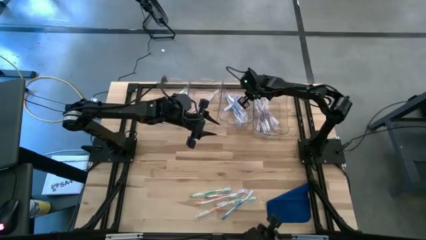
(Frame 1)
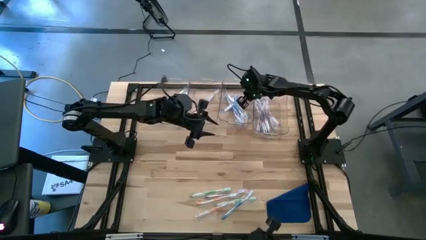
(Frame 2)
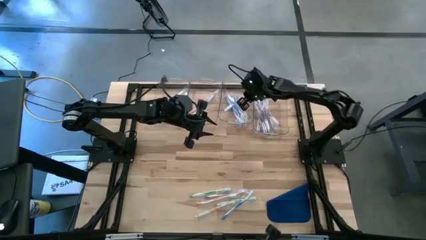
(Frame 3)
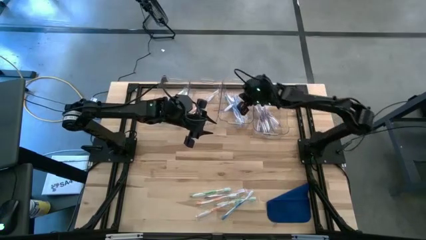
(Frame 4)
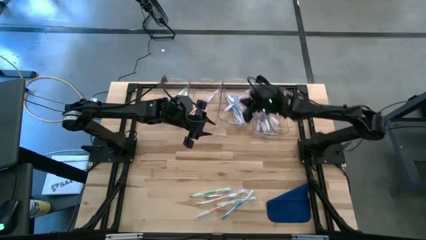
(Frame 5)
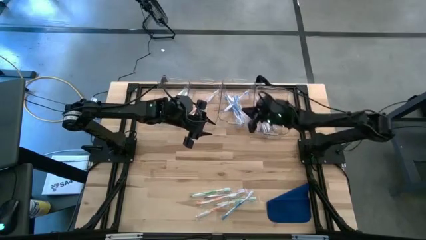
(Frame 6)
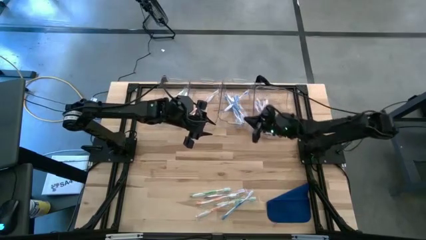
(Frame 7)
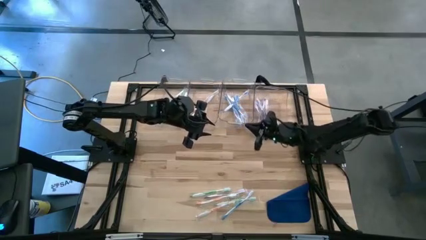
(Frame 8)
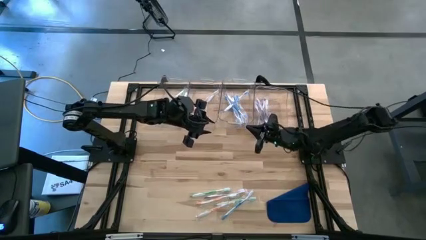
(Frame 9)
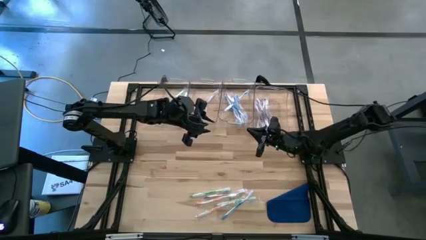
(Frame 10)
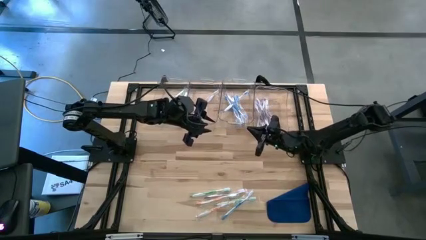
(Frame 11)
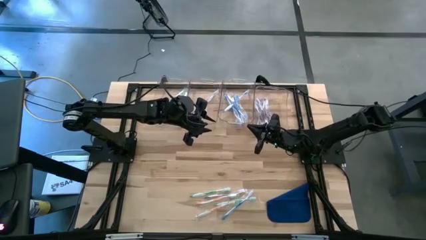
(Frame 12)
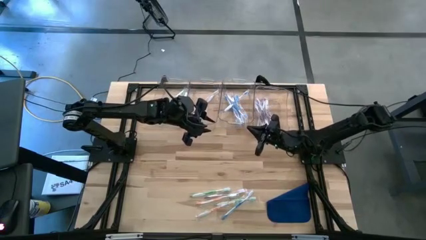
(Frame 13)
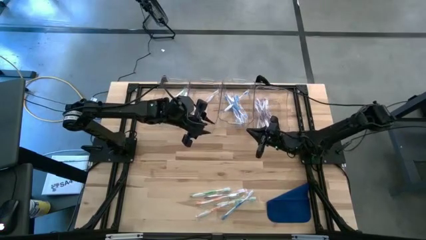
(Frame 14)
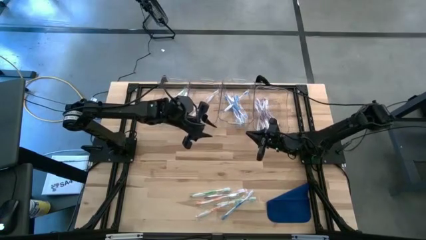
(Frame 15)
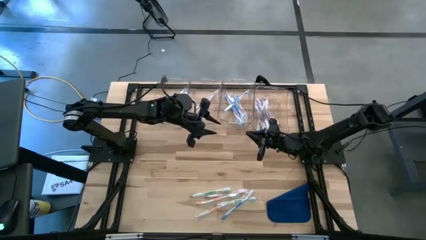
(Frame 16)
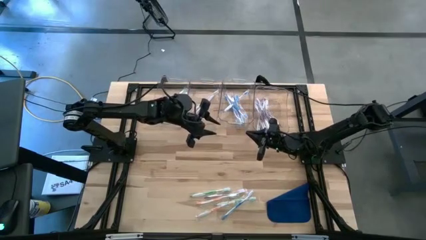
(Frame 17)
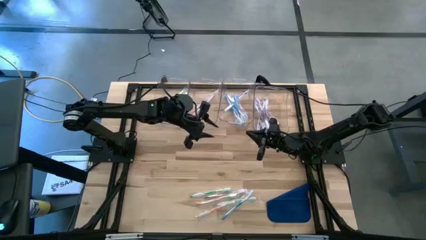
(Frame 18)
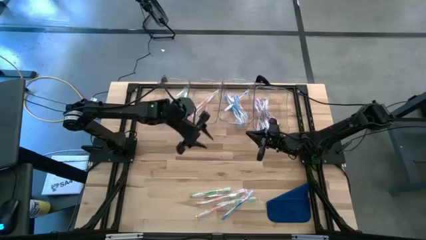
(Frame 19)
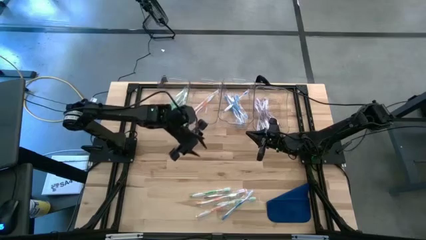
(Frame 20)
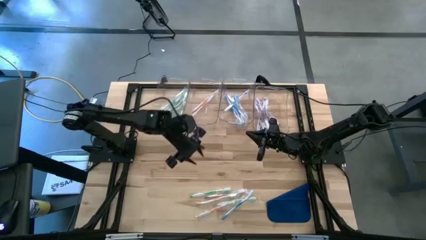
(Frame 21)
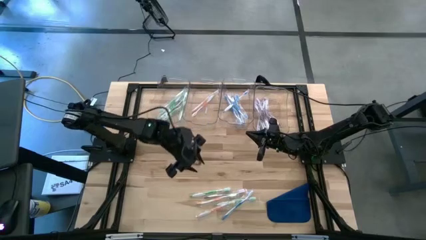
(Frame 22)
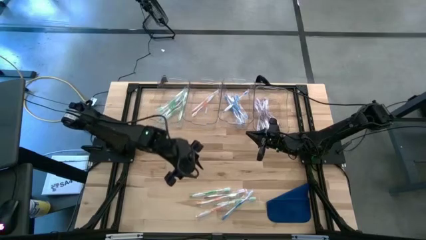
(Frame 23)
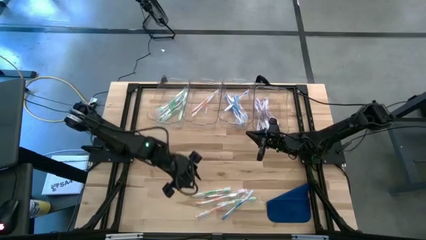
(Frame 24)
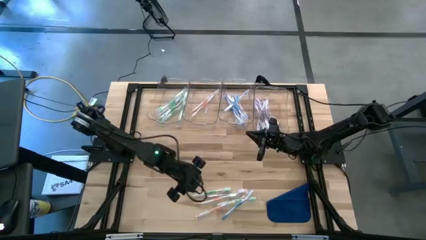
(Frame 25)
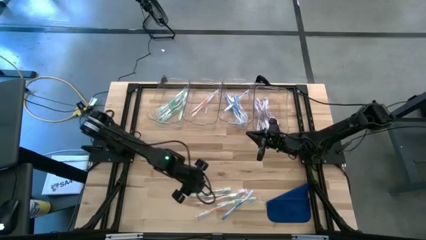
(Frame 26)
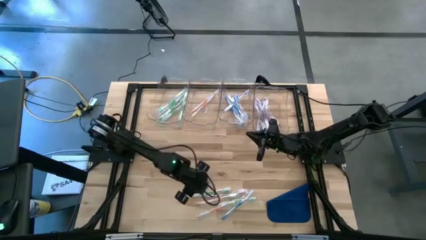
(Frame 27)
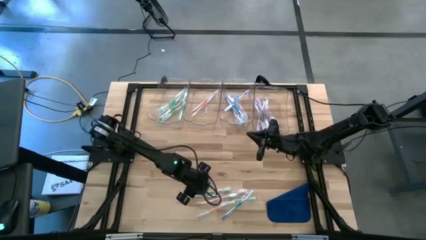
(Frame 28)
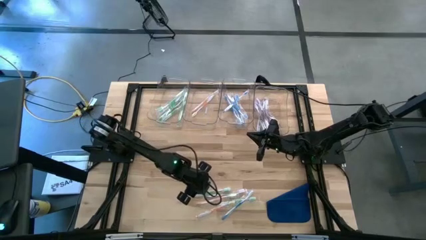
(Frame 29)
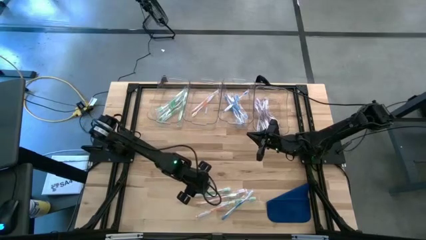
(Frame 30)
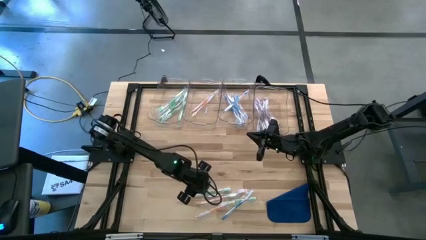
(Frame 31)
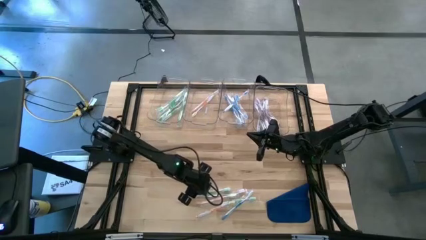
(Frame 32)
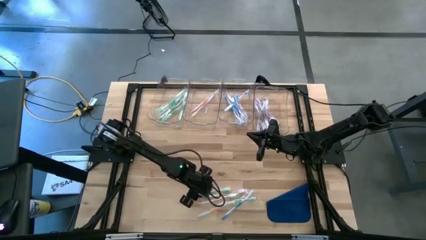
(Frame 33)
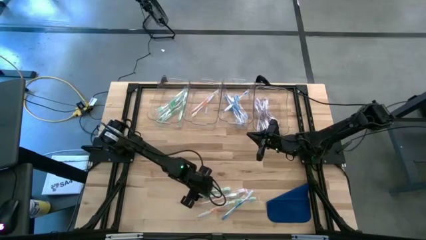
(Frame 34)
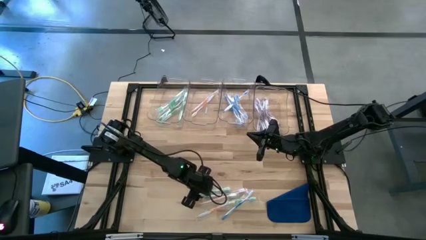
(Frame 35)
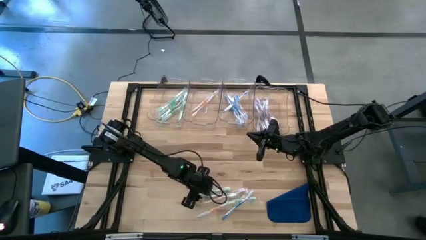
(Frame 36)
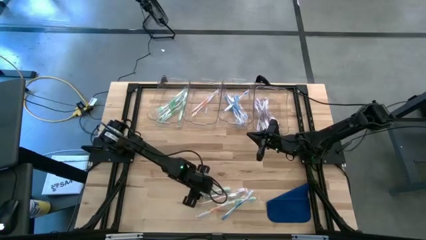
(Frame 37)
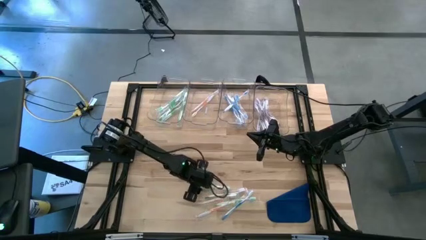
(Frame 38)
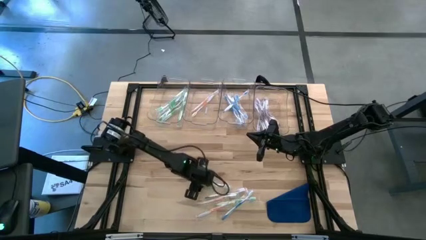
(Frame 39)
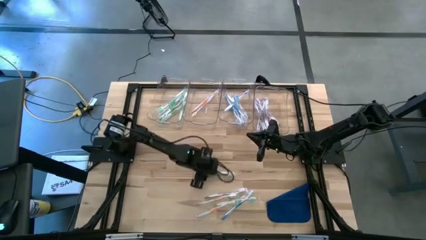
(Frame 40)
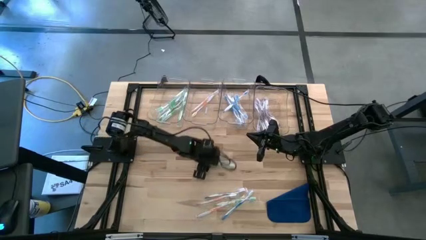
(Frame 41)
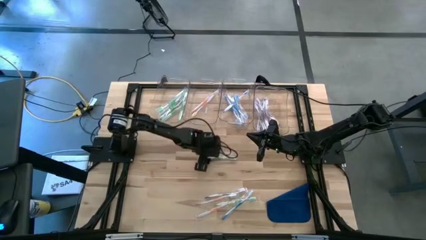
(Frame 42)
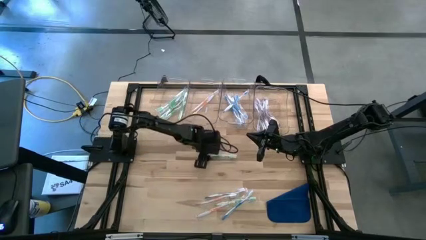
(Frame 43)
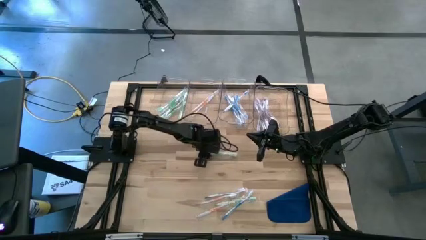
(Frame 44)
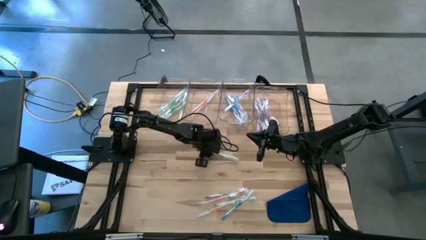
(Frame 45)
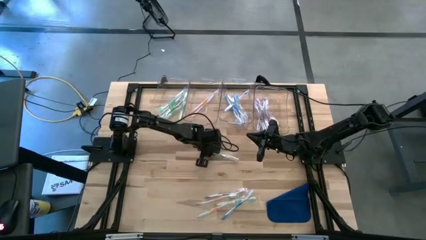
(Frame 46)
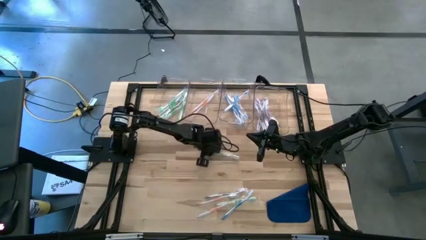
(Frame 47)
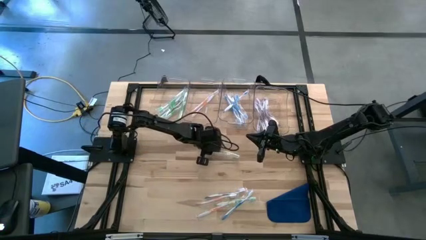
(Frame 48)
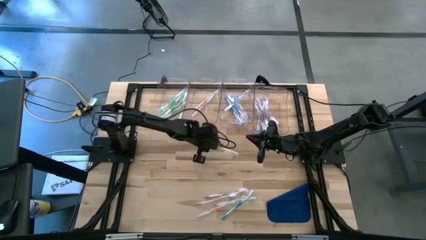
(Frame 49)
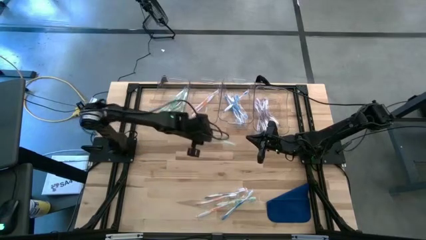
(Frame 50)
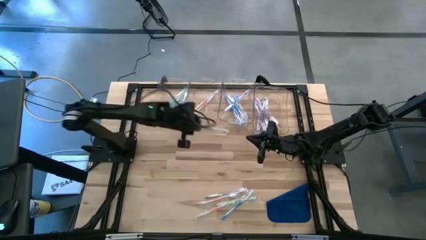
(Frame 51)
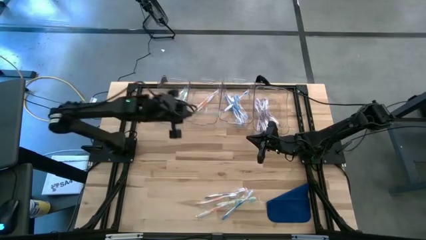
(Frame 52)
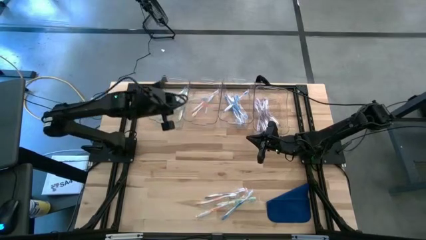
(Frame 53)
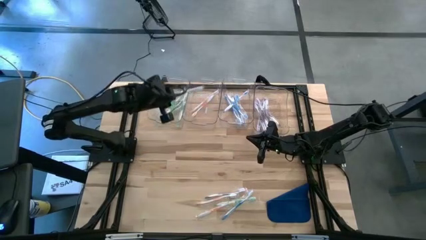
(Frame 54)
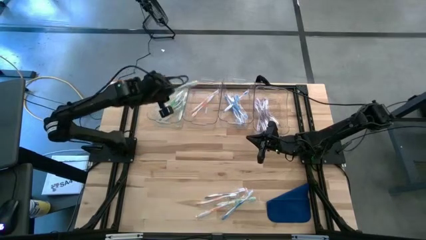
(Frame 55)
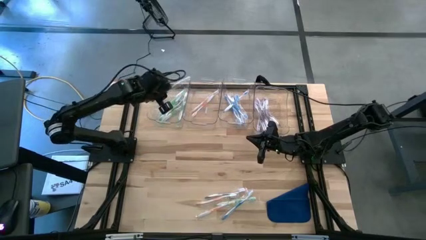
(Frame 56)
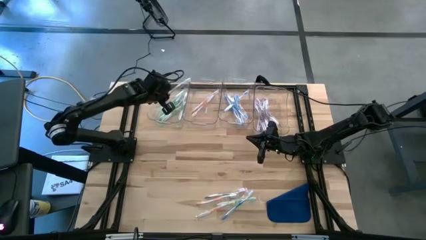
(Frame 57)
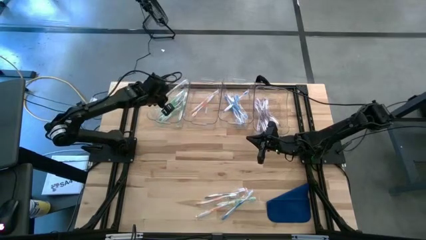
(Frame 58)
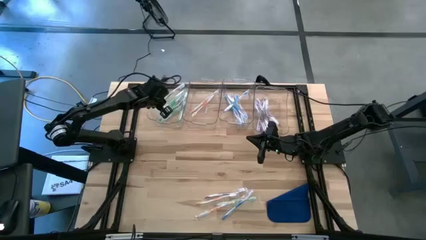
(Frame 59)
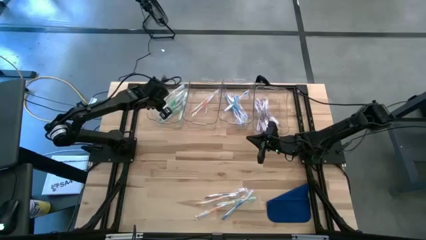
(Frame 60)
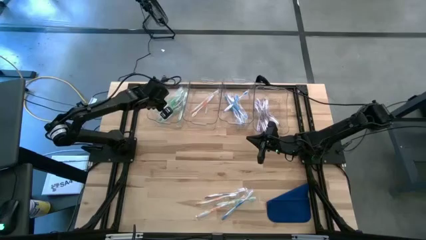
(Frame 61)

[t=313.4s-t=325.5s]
Task: Pick & Place Toothbrushes
Put the green toothbrush into the left transparent bin

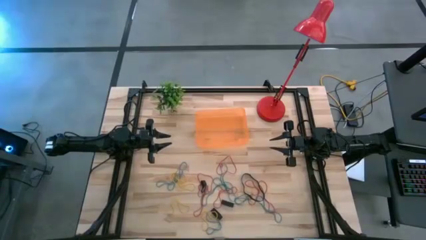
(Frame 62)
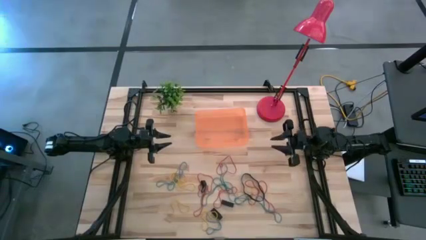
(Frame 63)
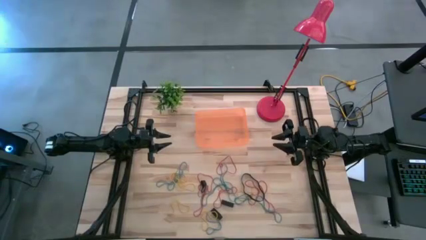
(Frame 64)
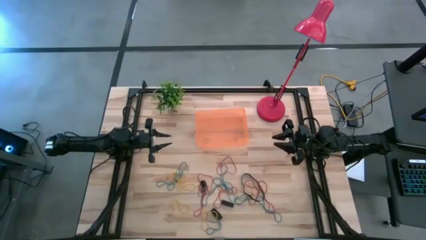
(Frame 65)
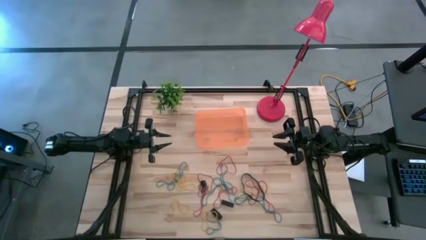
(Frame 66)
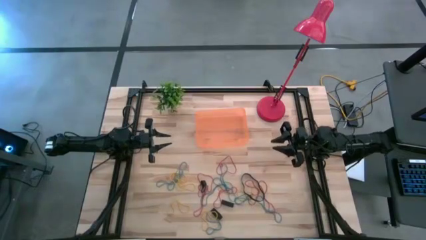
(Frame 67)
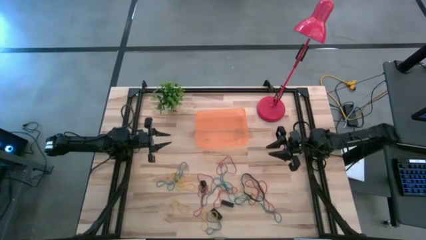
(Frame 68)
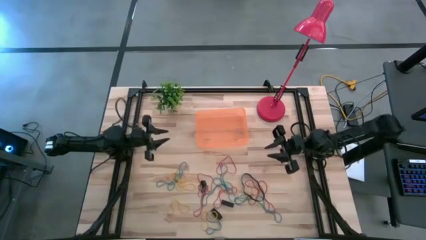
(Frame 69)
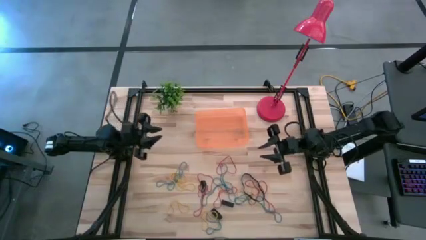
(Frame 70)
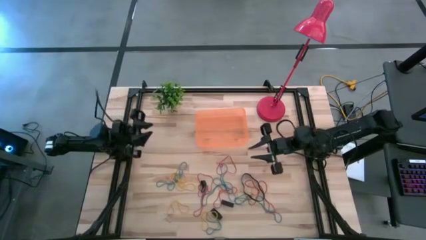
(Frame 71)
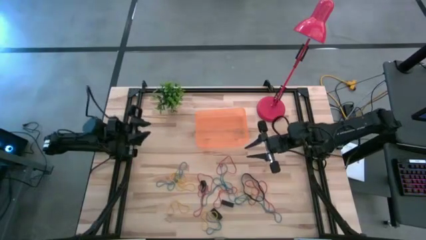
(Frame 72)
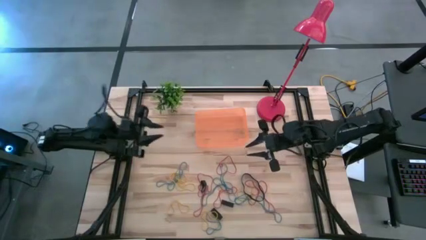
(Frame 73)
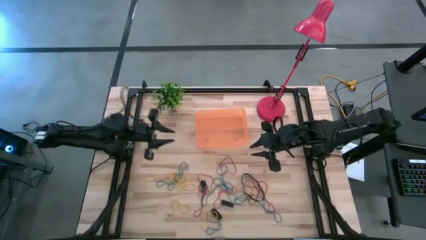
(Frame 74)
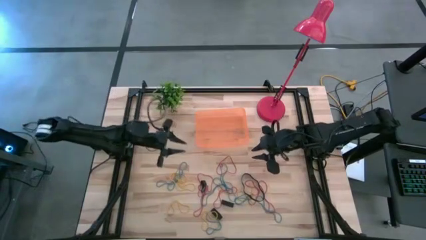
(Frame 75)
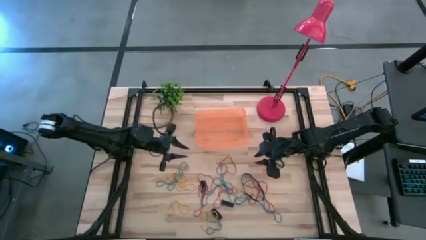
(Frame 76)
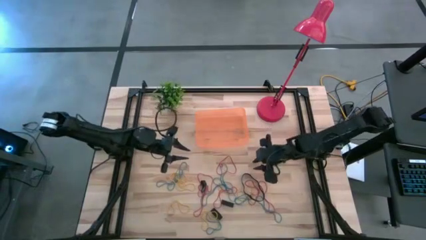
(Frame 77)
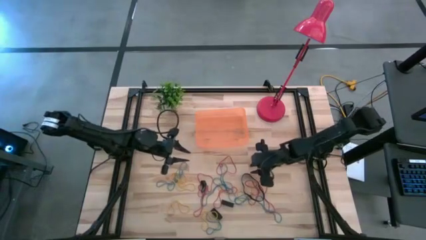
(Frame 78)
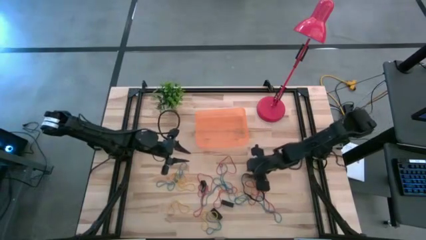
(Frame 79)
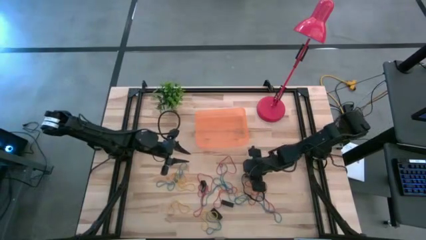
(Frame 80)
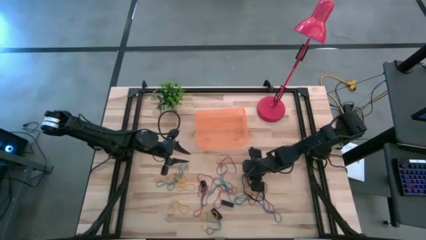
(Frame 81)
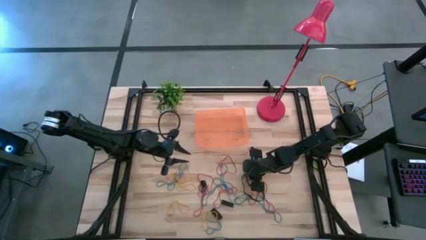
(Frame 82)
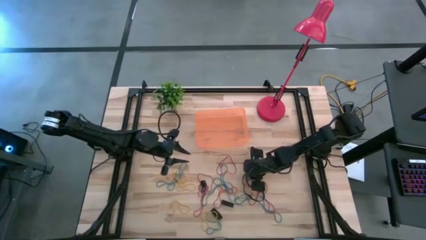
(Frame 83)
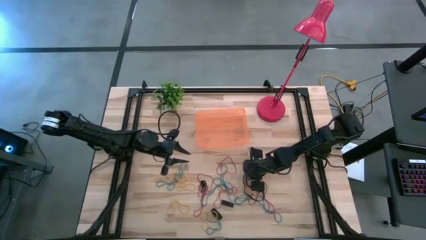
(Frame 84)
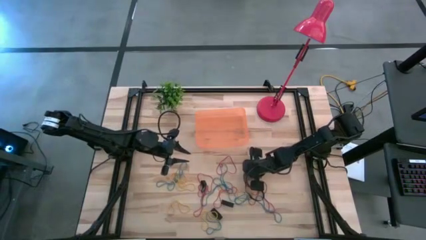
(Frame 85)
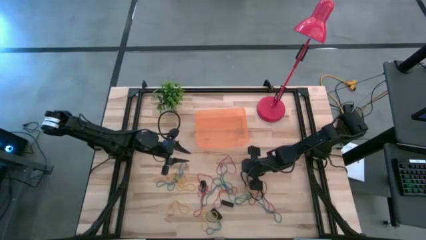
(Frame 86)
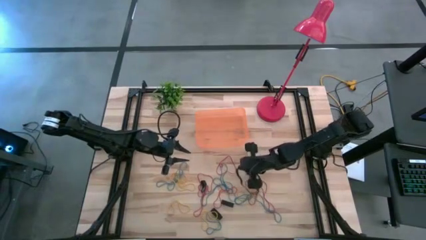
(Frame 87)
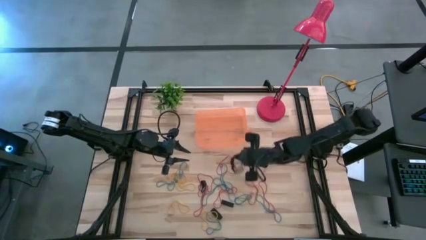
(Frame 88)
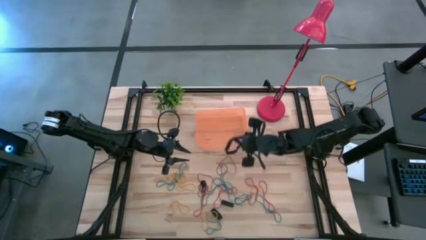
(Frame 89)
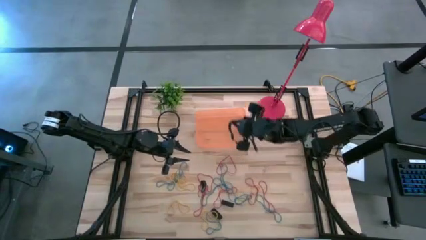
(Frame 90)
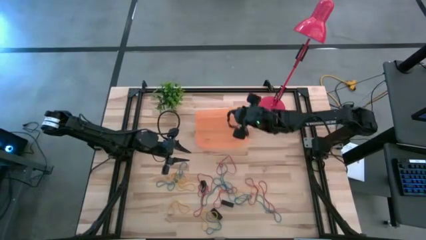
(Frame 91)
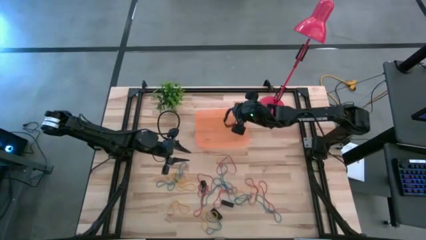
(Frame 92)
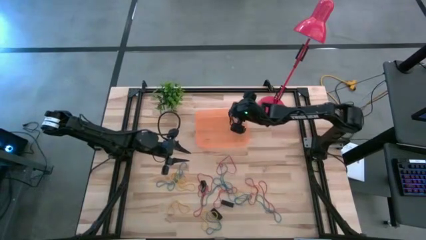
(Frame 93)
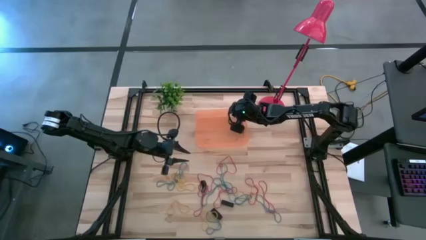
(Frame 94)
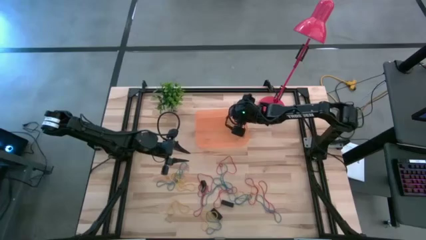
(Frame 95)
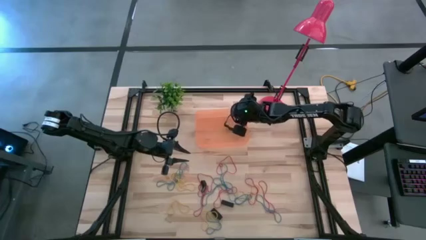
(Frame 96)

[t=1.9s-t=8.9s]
Task: Pick and place rubber bands into bin
Put the black rubber band into the orange bin
